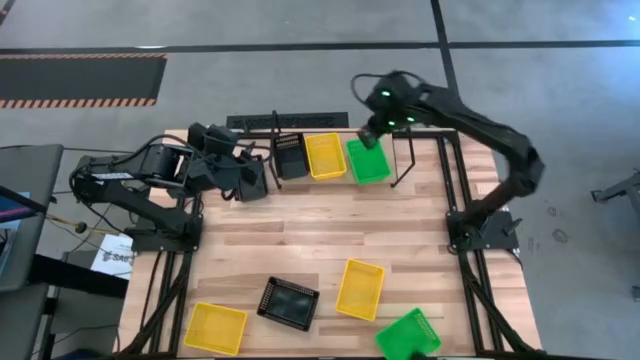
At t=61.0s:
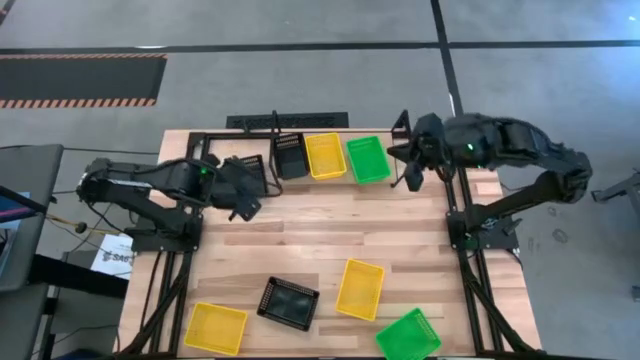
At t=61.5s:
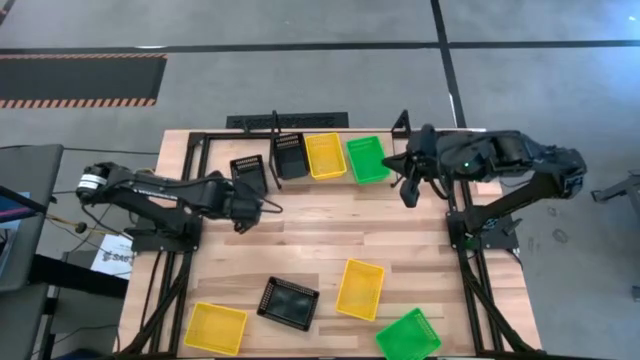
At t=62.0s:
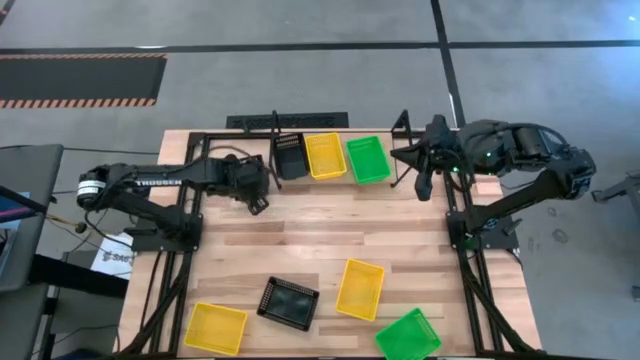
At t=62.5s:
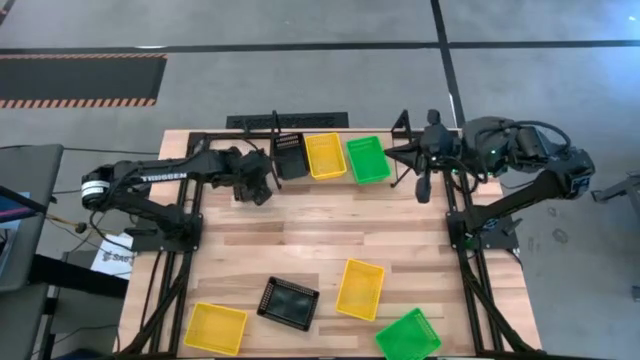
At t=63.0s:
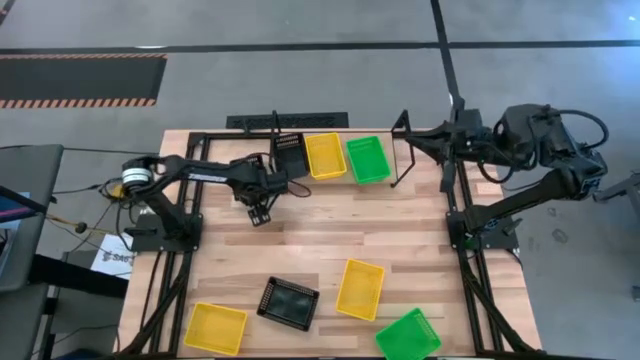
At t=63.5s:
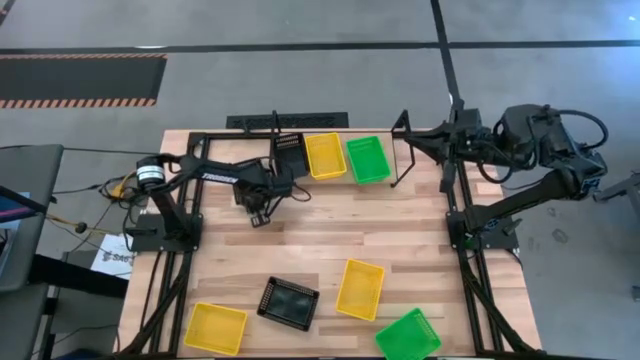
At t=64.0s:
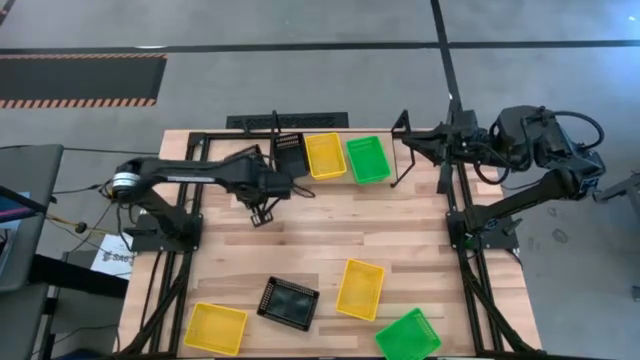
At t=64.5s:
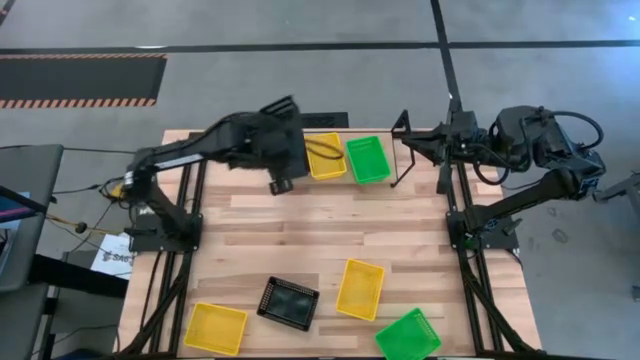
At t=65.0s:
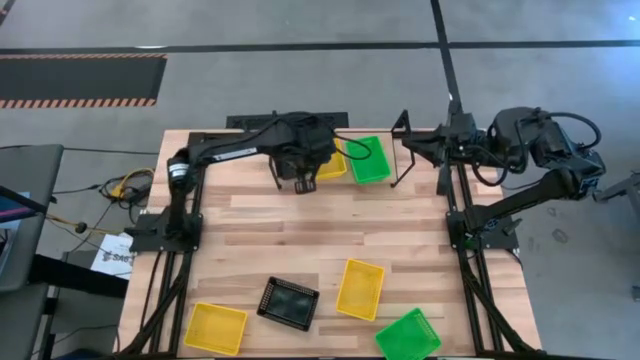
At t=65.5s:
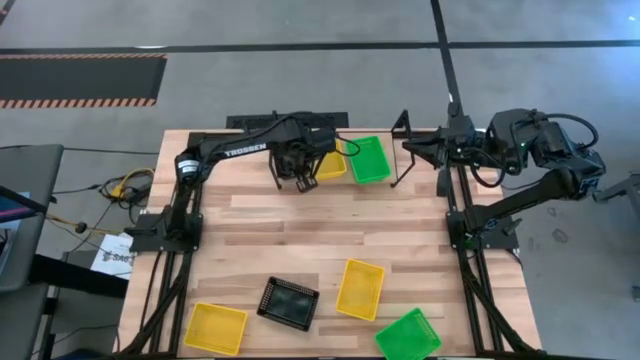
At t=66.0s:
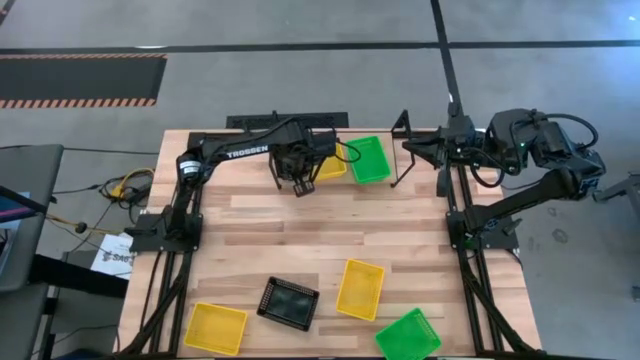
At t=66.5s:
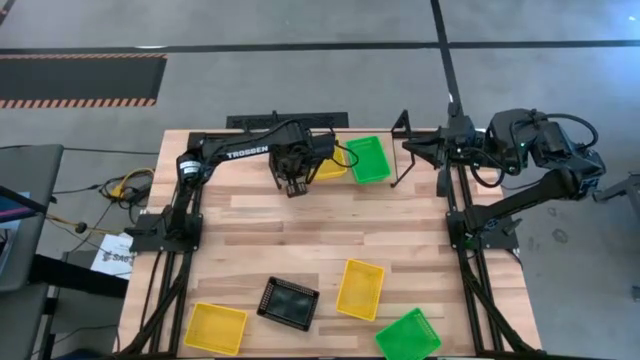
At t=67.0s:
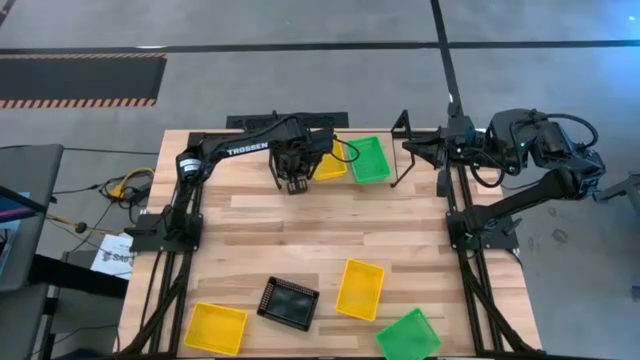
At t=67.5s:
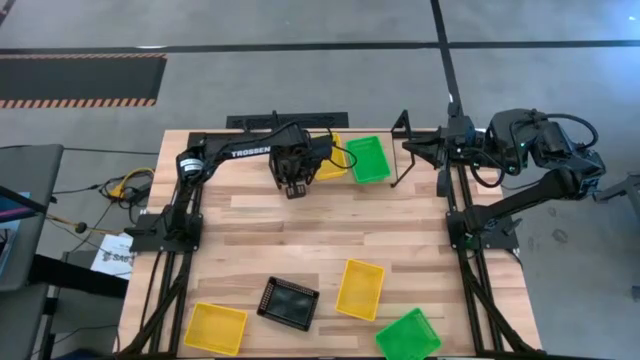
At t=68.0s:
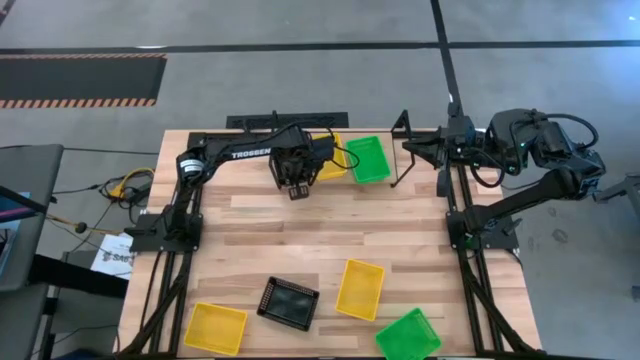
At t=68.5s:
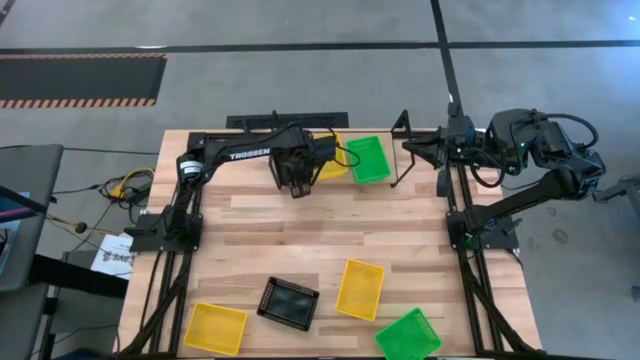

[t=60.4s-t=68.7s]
Task: Stack baskets on shelf by color
Stack the top black bin on top of the black bin on the shelf

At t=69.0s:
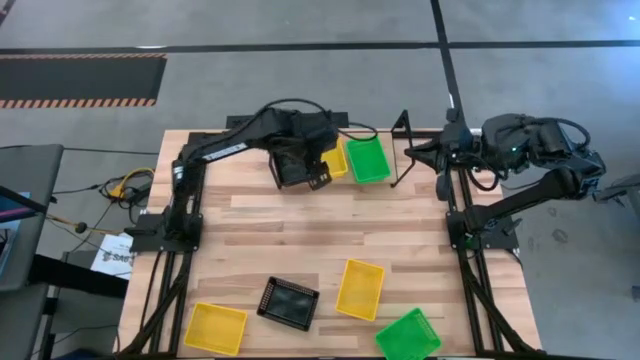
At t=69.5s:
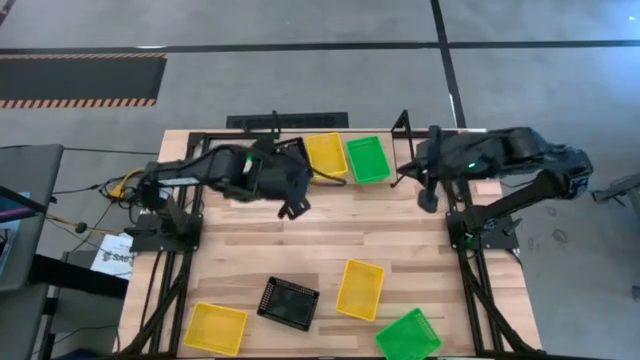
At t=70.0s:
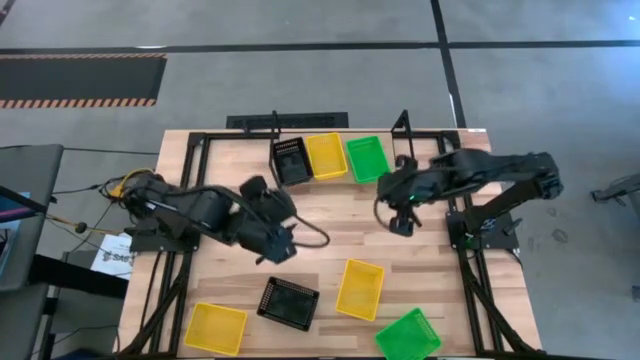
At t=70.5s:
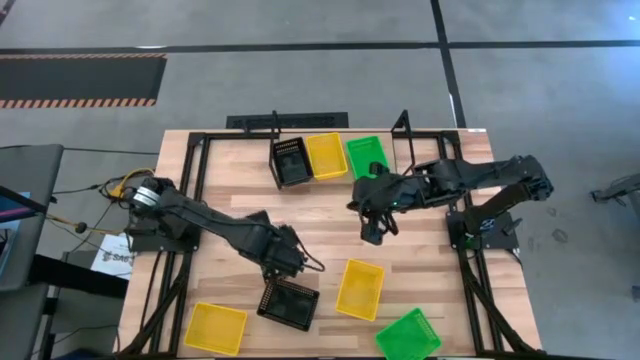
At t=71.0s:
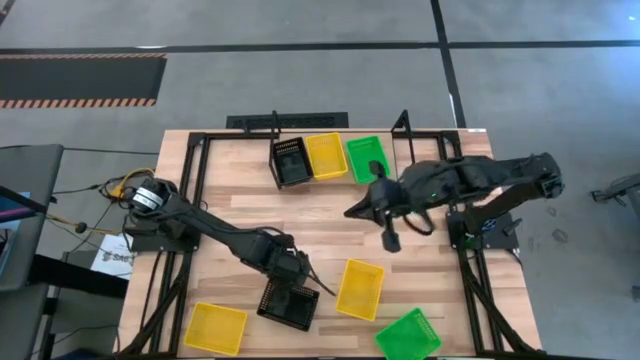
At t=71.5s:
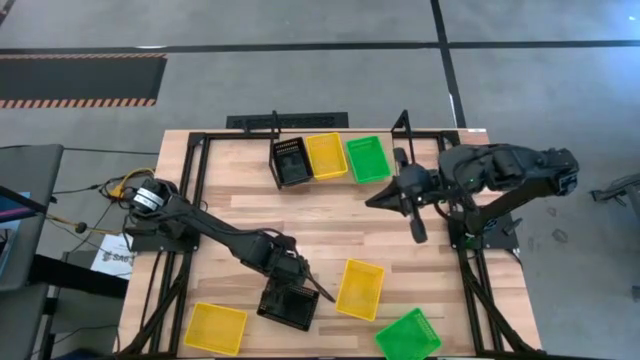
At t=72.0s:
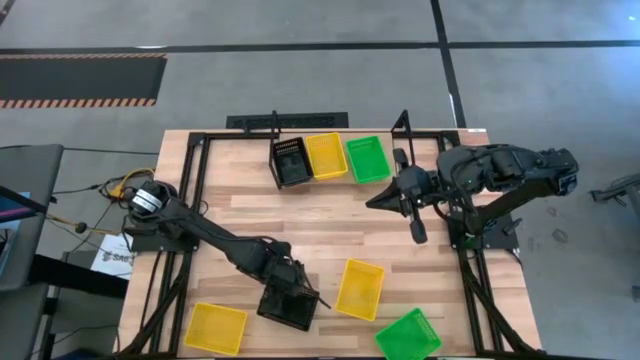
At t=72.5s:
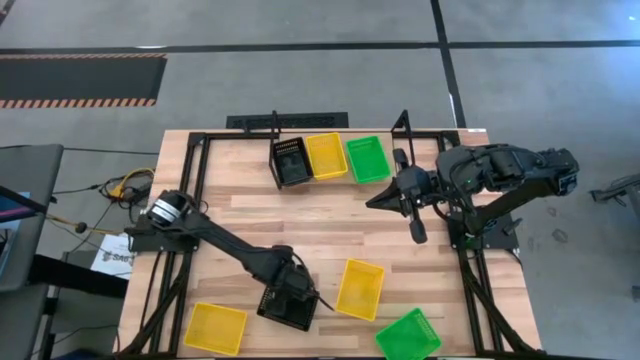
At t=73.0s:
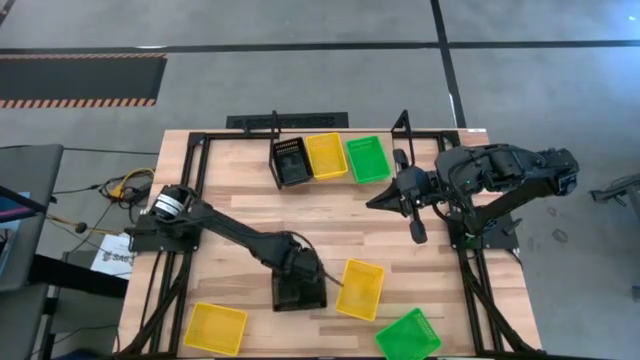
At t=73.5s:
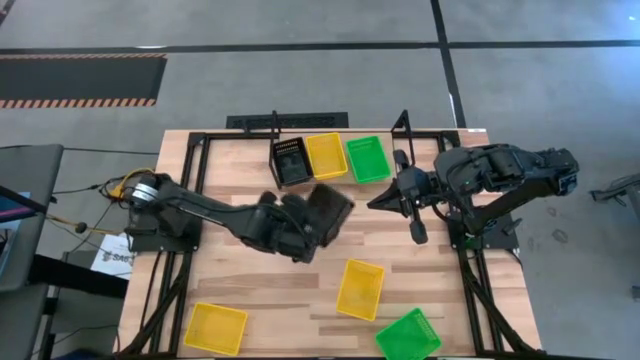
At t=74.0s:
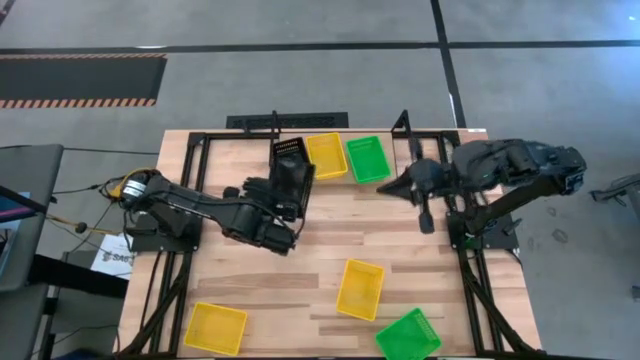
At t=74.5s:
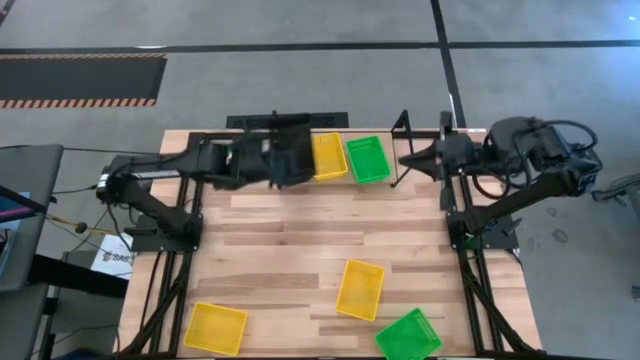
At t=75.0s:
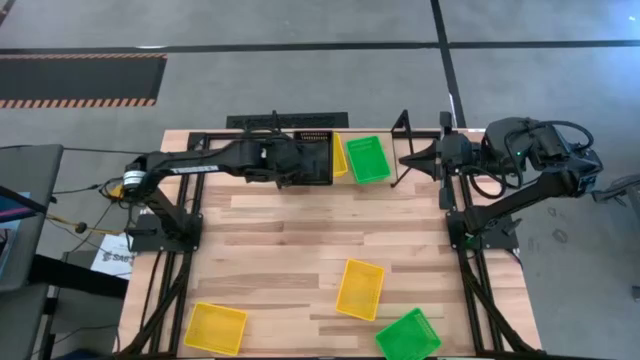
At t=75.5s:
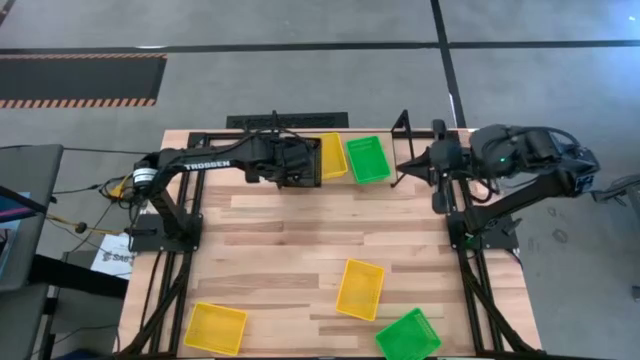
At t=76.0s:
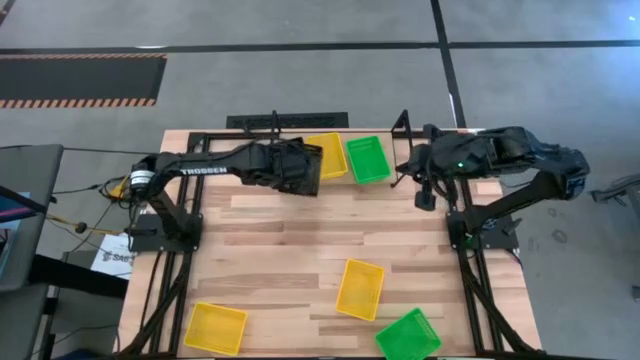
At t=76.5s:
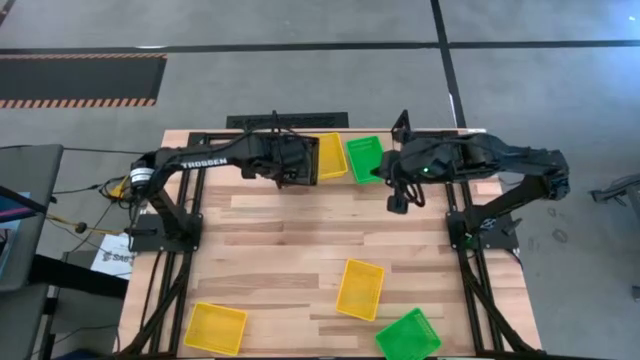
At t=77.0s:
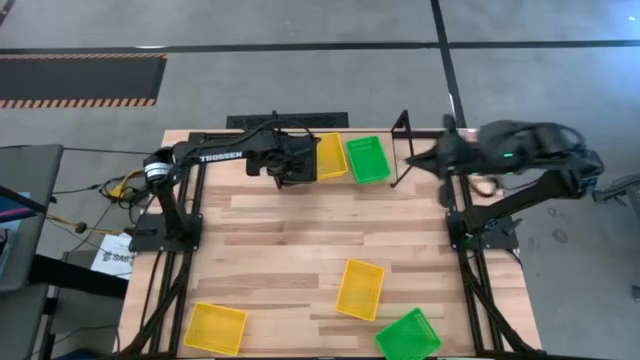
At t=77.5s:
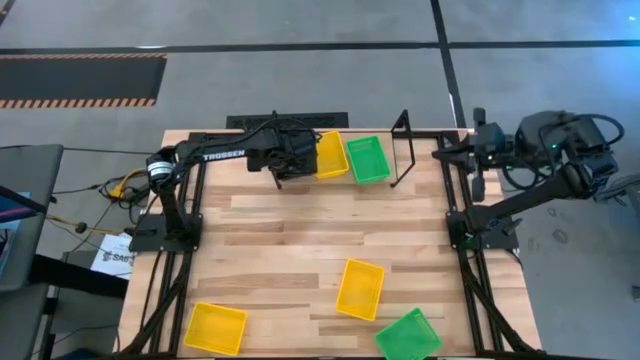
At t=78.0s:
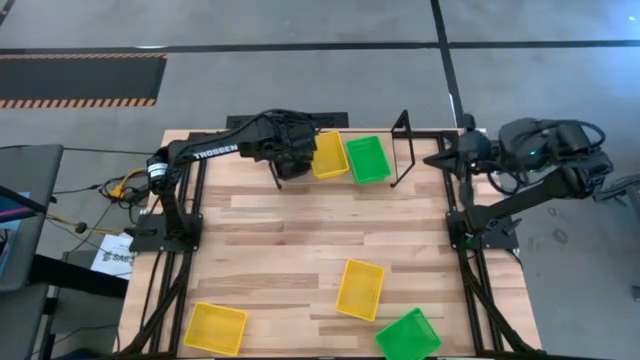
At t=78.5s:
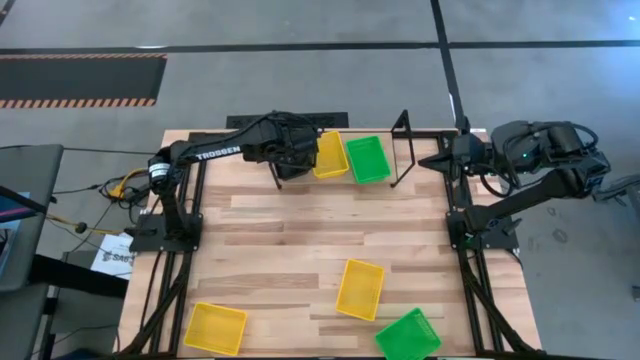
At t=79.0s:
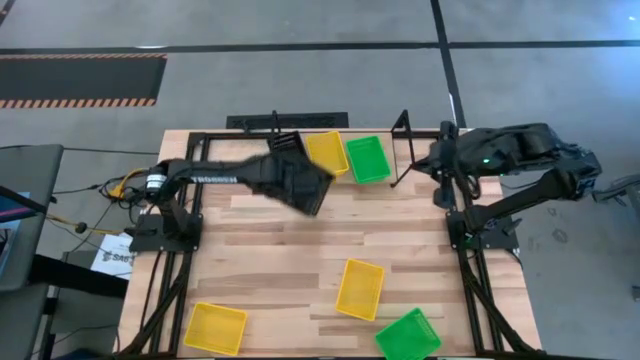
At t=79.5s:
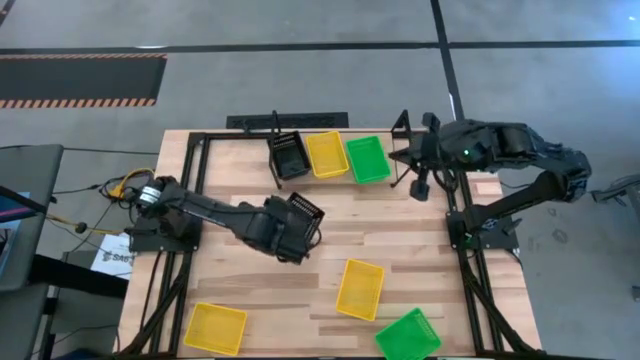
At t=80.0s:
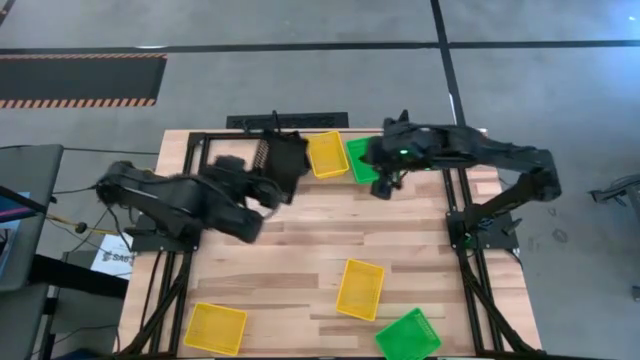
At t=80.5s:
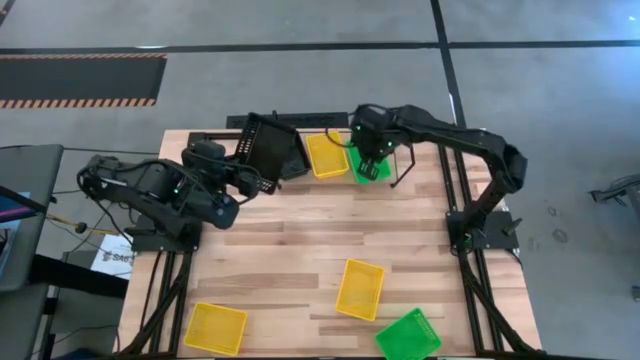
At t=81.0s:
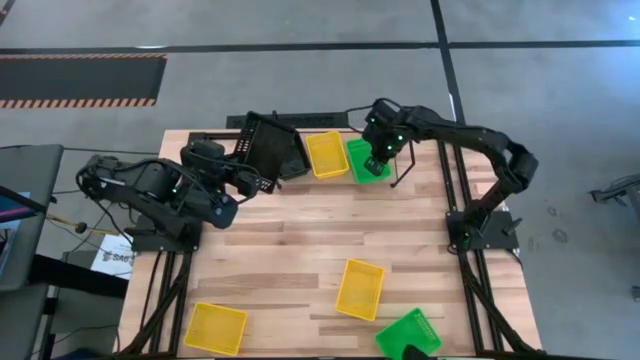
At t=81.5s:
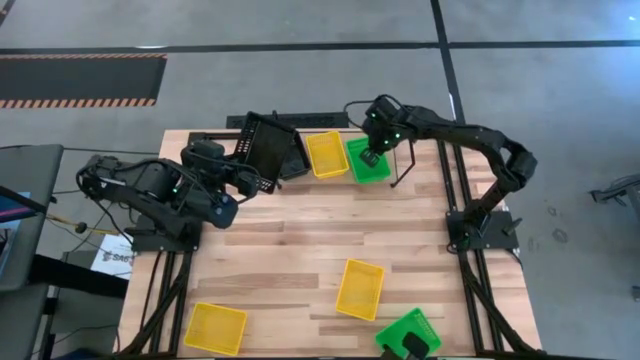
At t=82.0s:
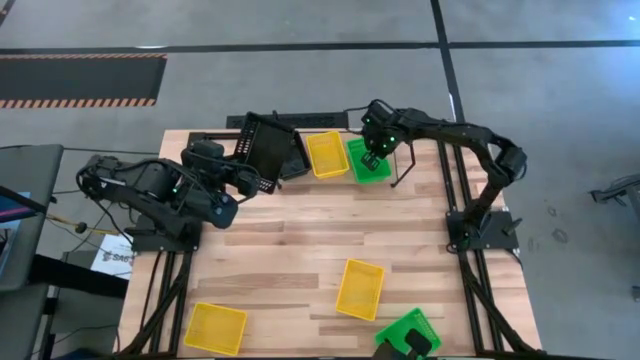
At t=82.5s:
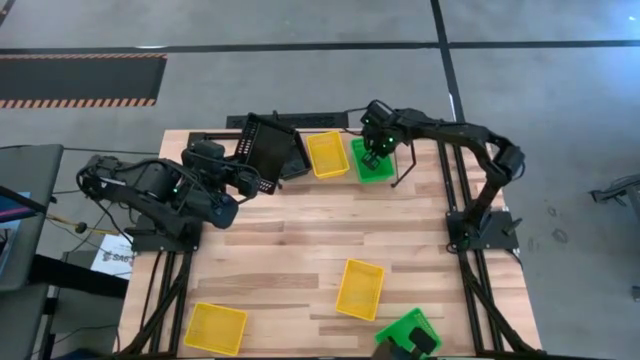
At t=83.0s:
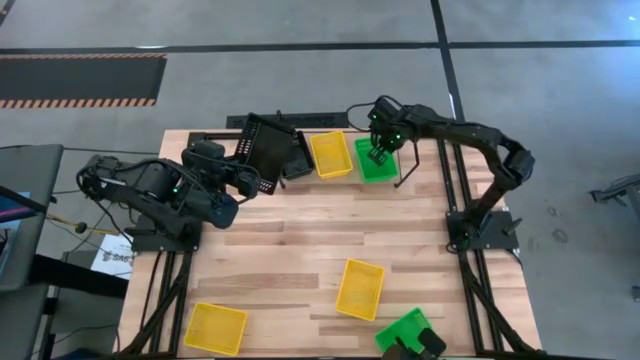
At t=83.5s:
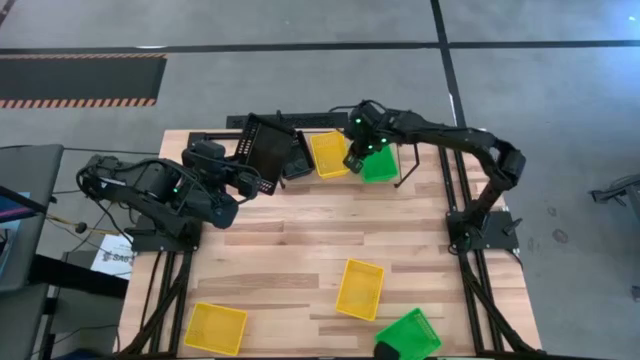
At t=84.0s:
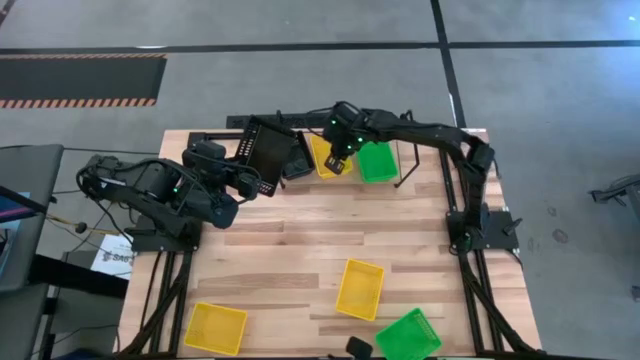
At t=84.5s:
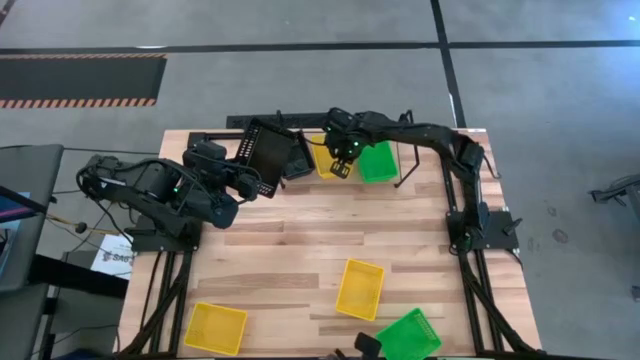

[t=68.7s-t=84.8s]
Stack the black bin on top of the black bin on the shelf
